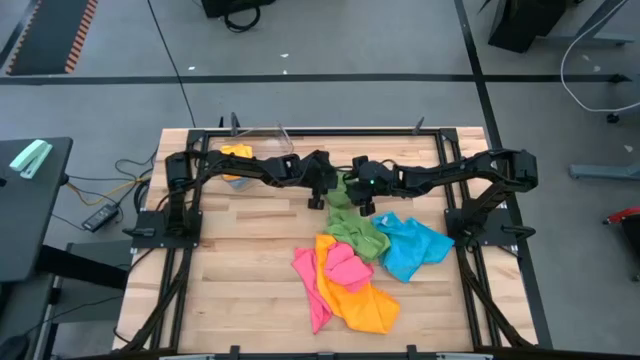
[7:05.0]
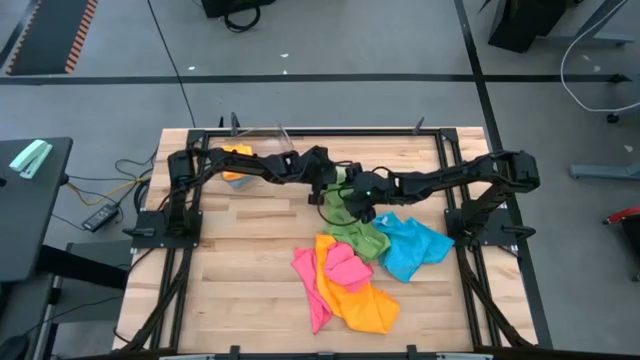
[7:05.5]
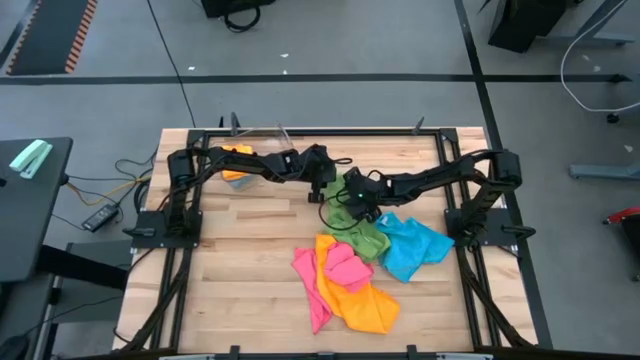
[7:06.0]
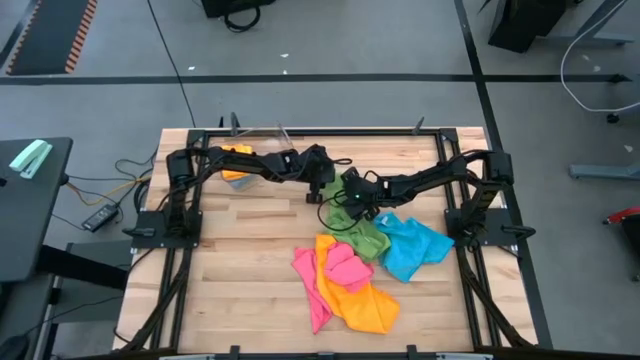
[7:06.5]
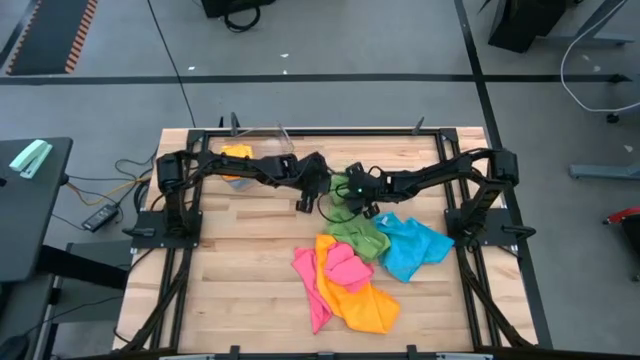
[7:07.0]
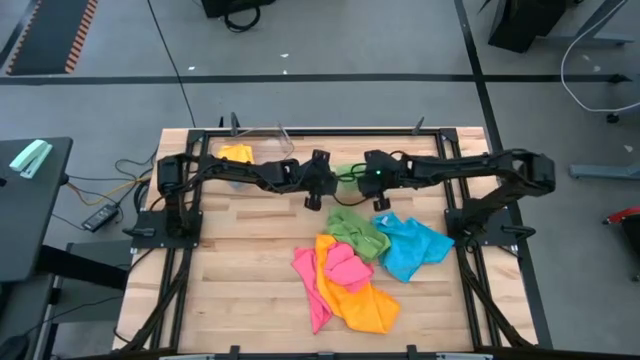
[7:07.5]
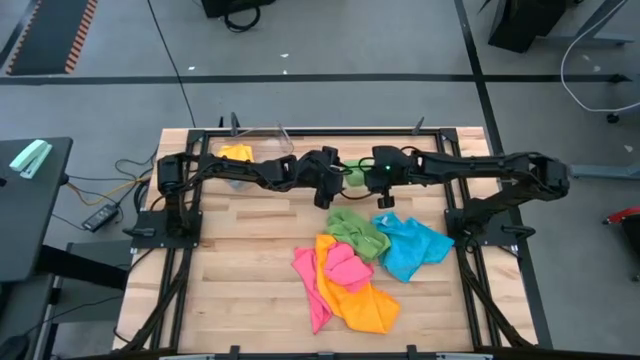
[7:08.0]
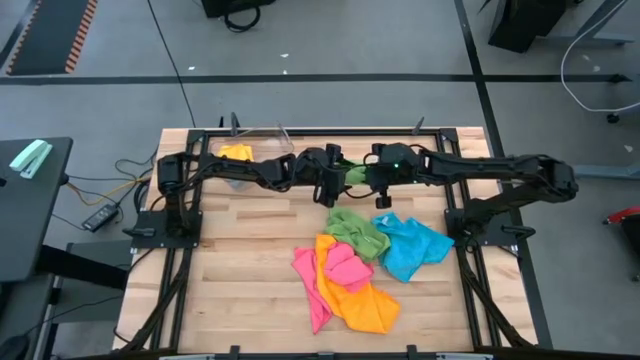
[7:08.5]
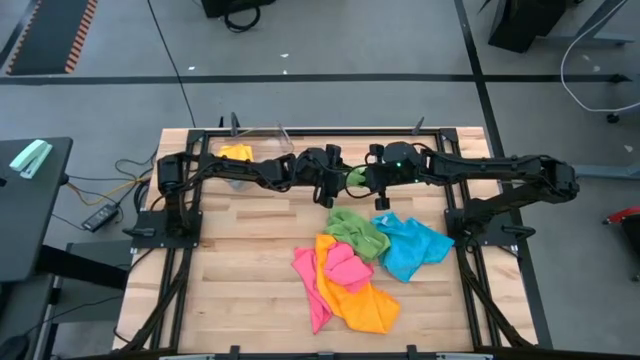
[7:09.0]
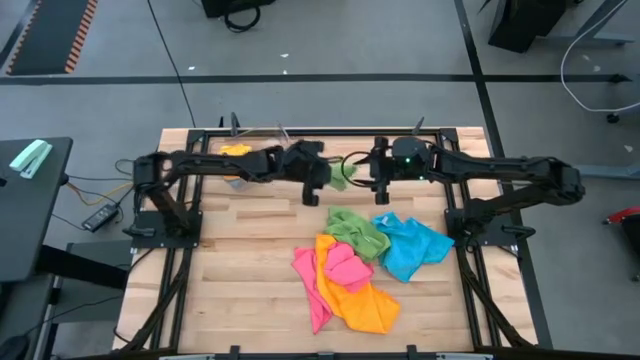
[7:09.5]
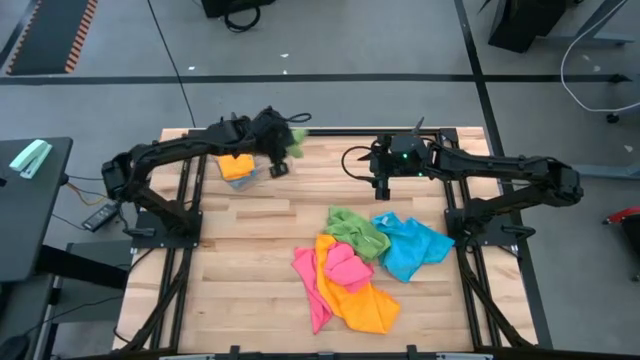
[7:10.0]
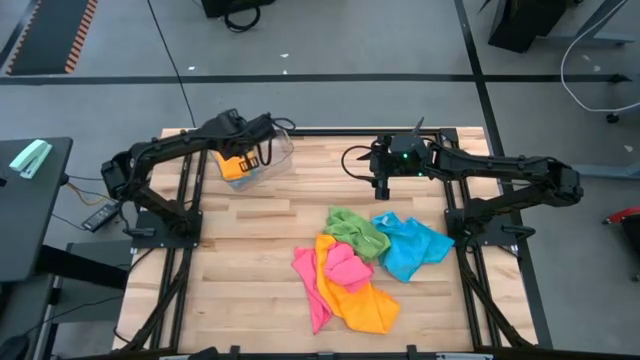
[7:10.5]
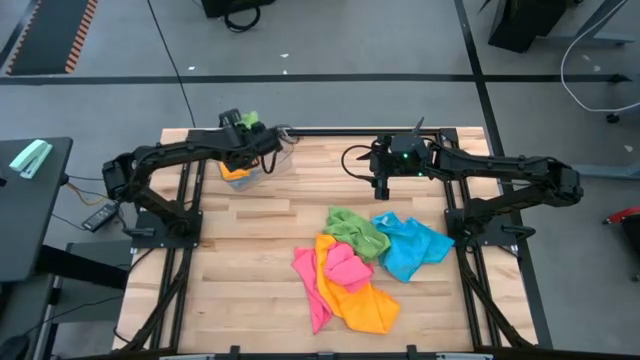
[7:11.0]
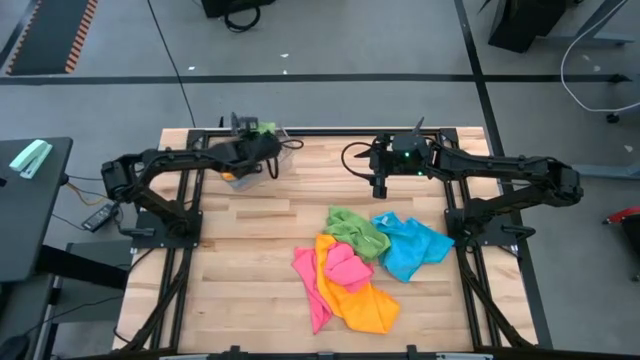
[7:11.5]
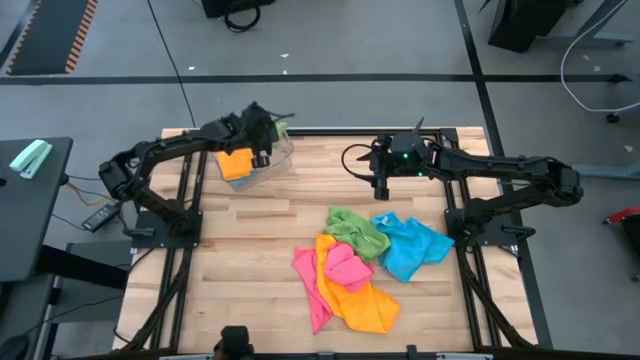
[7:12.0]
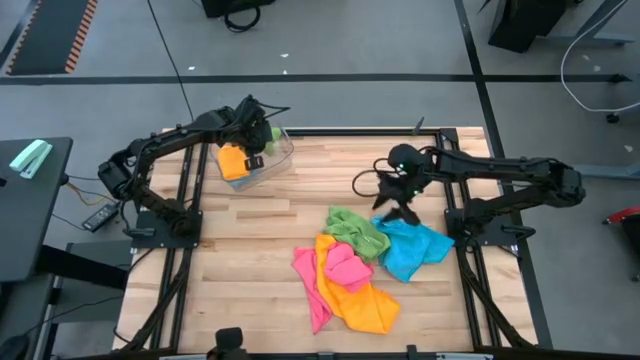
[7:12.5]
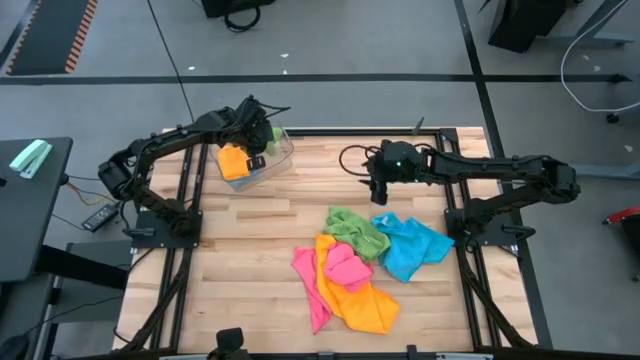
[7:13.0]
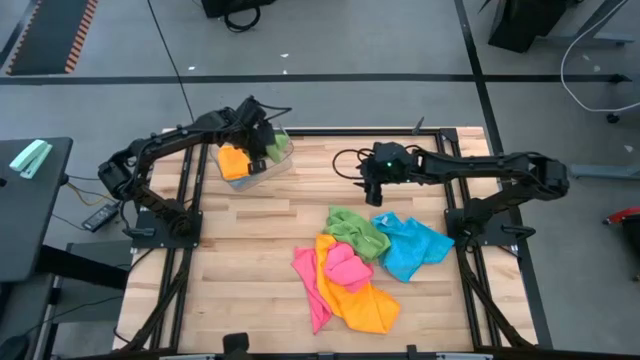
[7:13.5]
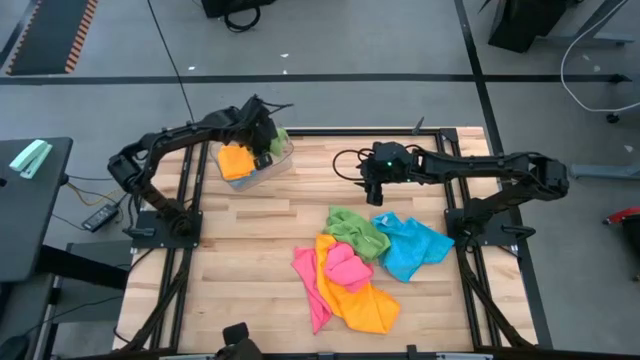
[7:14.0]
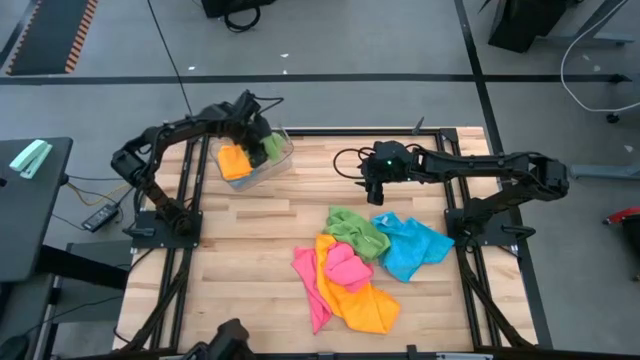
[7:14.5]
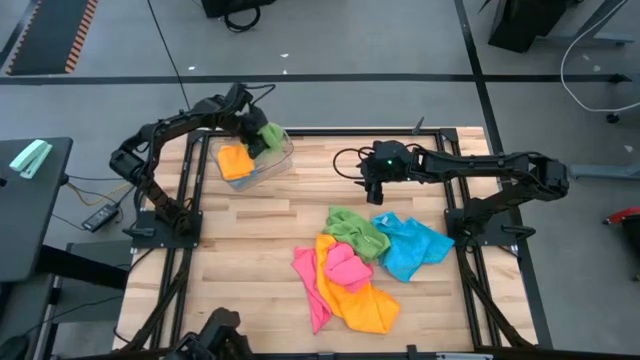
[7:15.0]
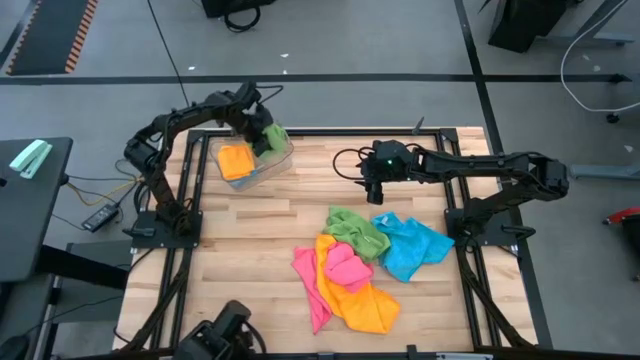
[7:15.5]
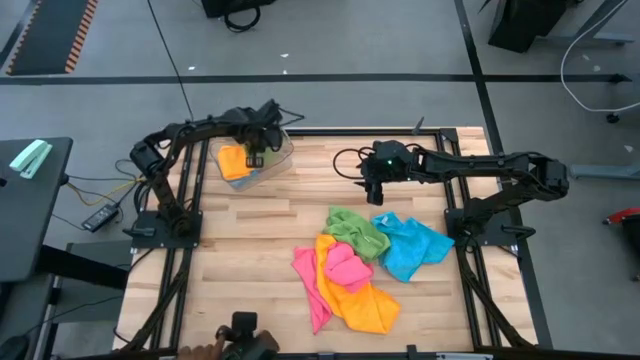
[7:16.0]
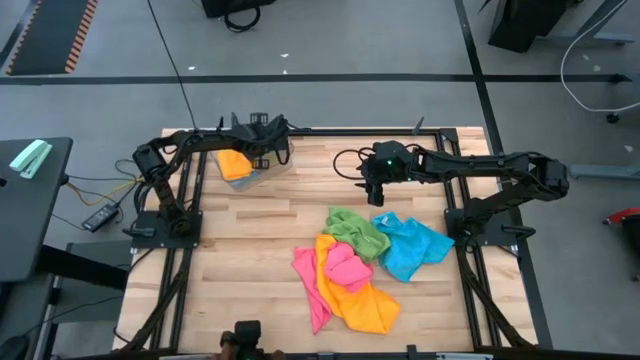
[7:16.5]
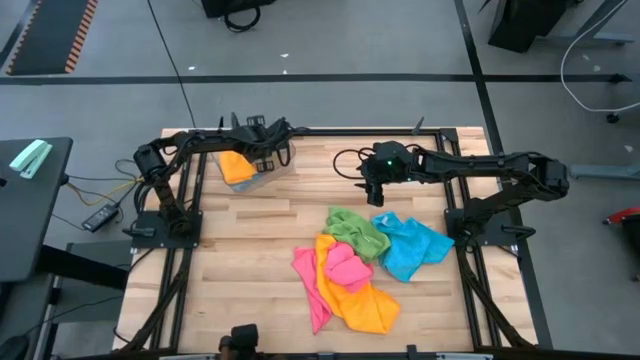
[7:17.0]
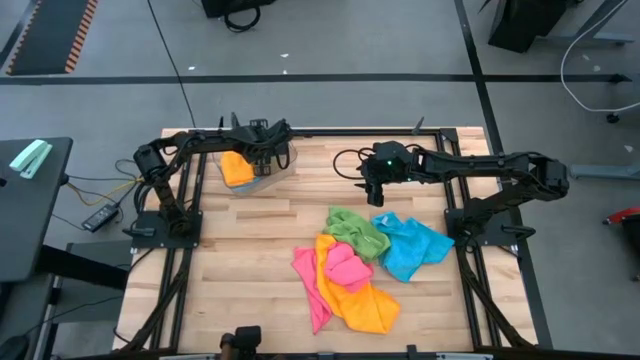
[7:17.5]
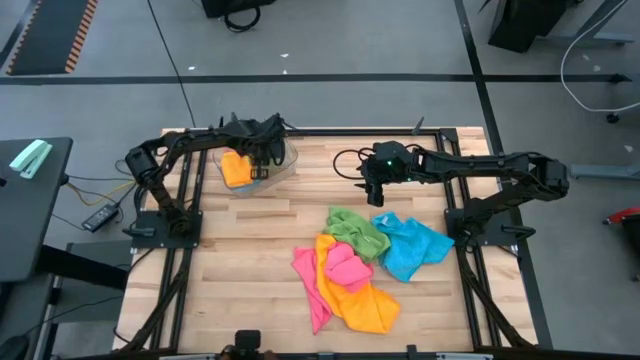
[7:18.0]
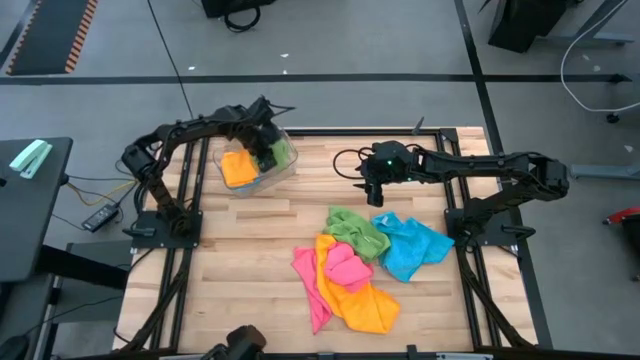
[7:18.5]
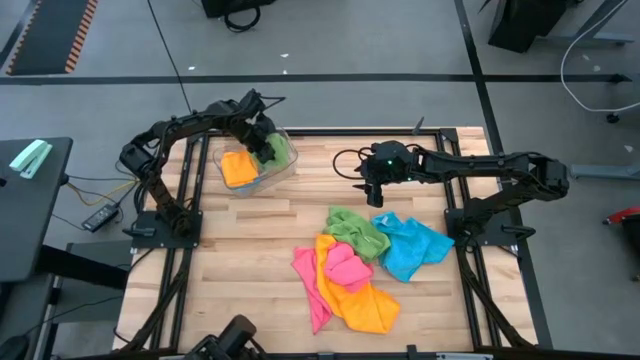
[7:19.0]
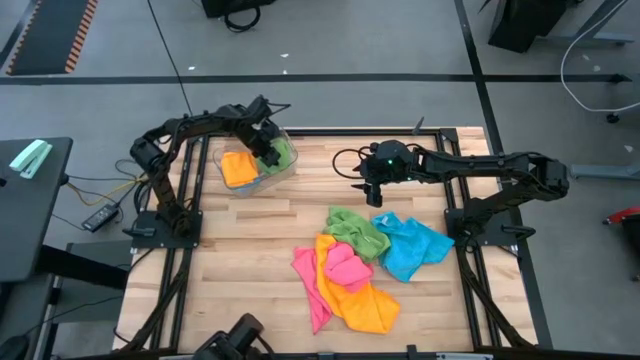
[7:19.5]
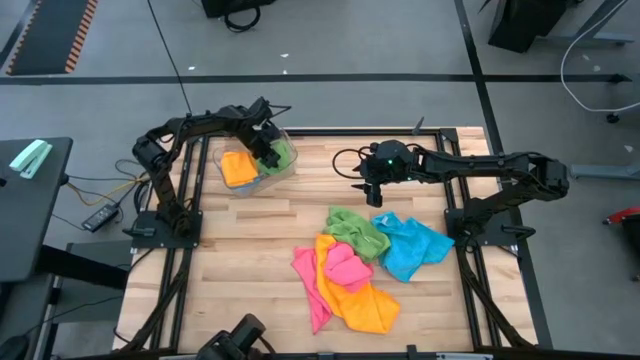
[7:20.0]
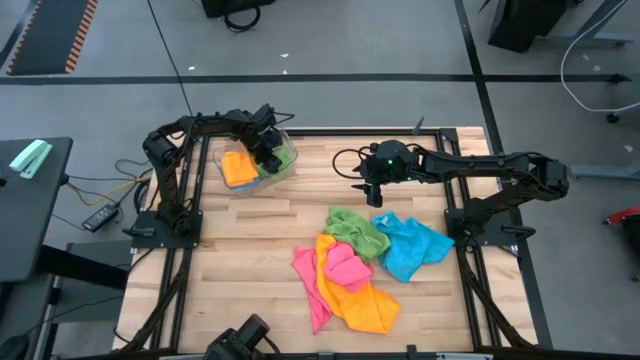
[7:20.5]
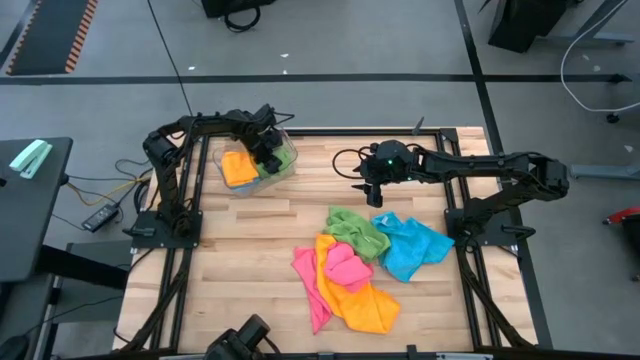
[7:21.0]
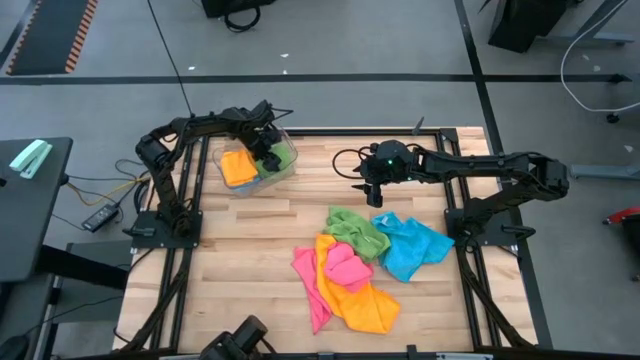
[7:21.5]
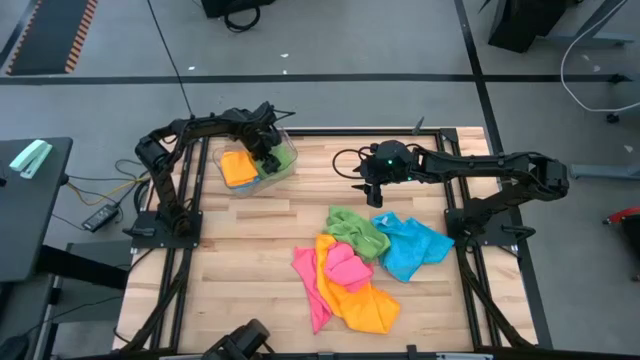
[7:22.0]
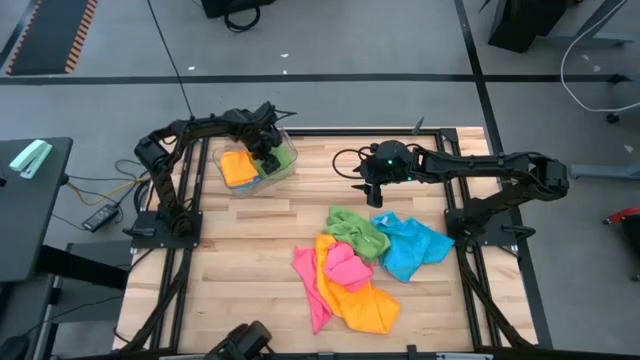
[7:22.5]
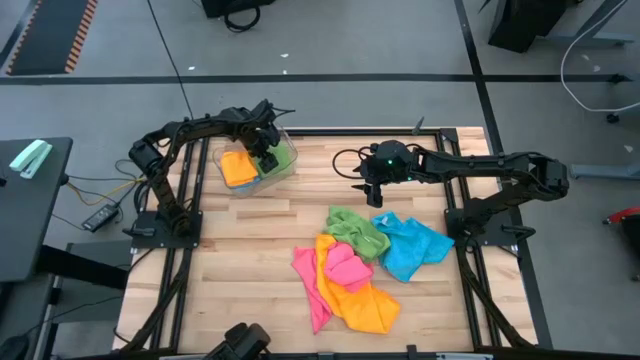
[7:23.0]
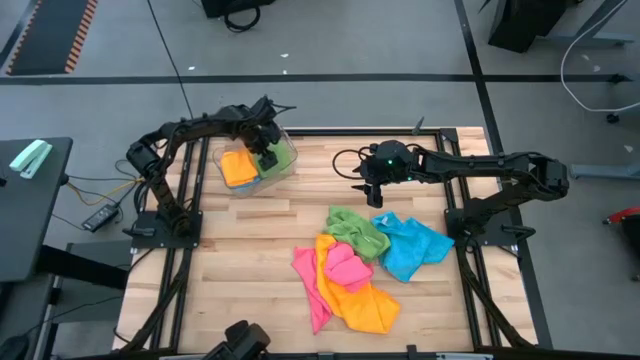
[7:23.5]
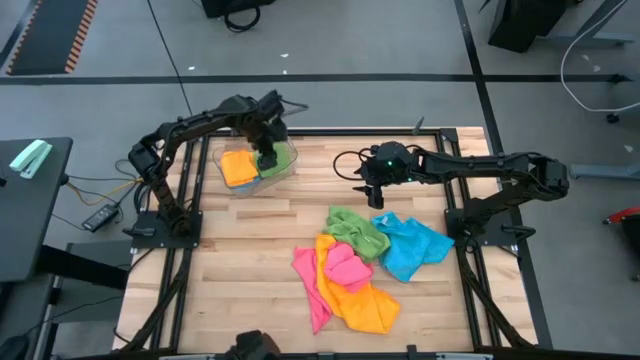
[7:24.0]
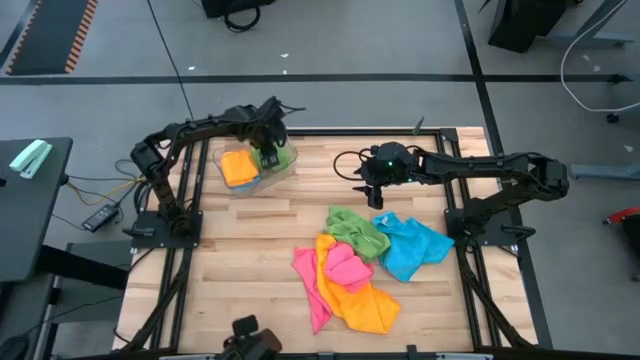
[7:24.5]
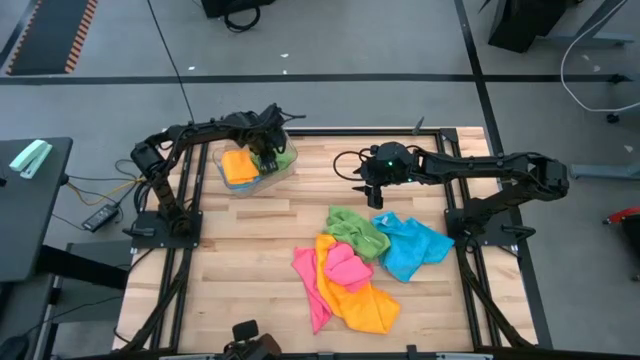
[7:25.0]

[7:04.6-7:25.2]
Task: Fold microfiber towels
Put the left green microfiber towel into the transparent bin
